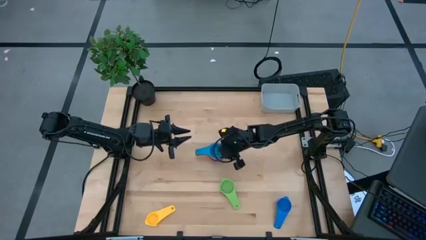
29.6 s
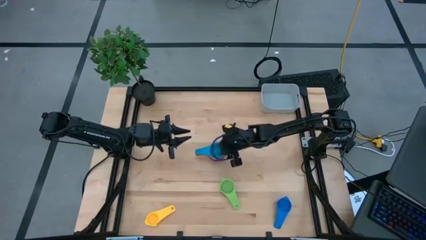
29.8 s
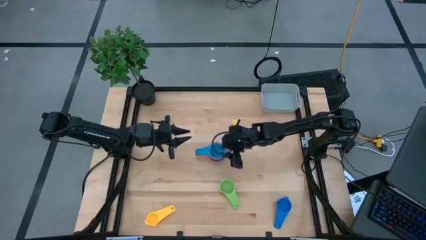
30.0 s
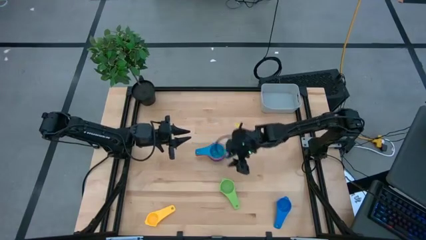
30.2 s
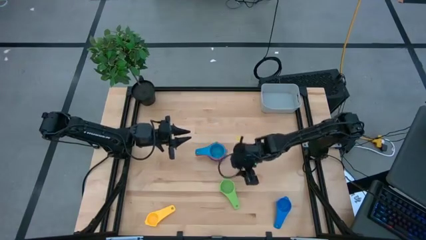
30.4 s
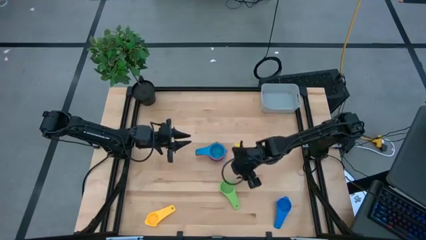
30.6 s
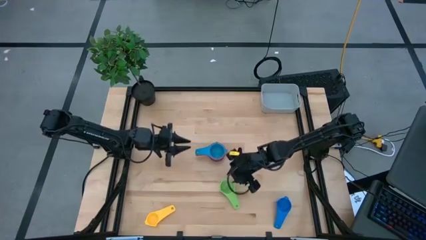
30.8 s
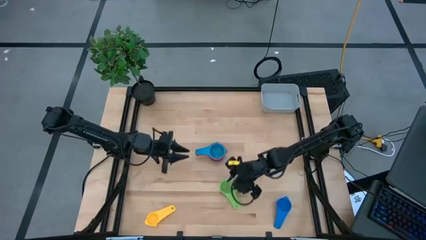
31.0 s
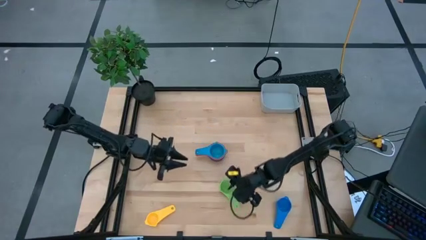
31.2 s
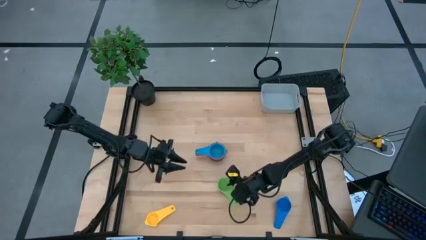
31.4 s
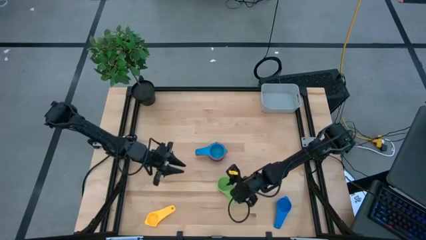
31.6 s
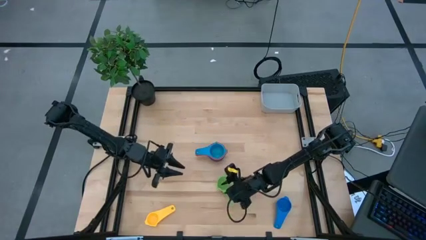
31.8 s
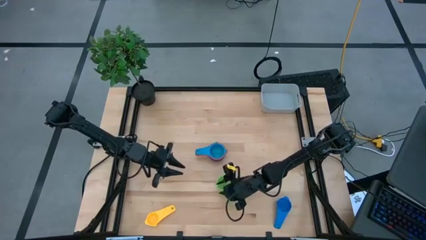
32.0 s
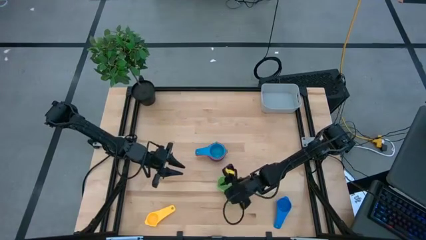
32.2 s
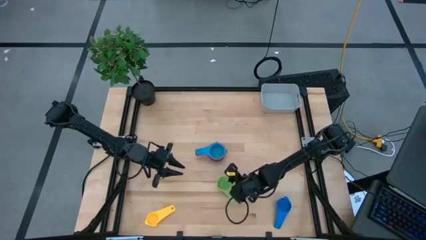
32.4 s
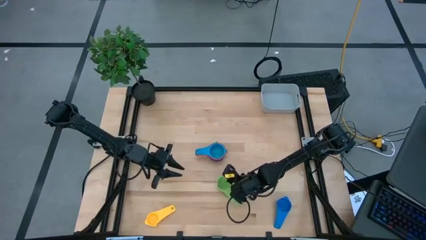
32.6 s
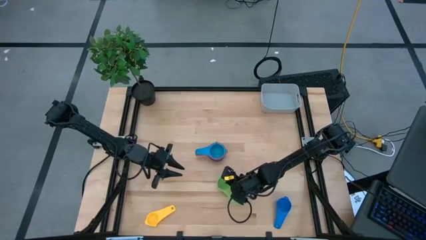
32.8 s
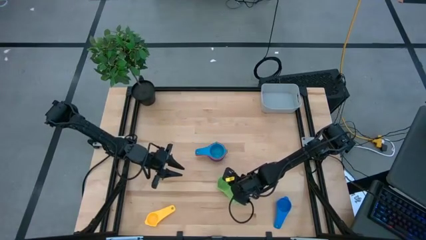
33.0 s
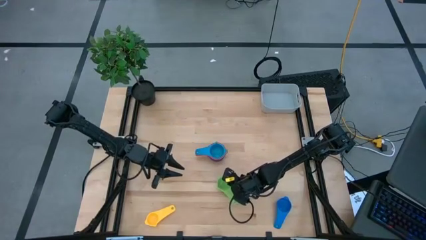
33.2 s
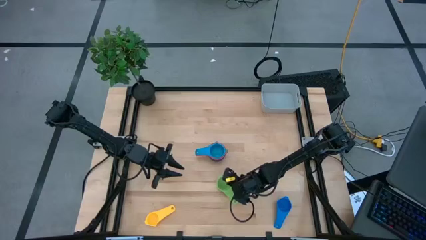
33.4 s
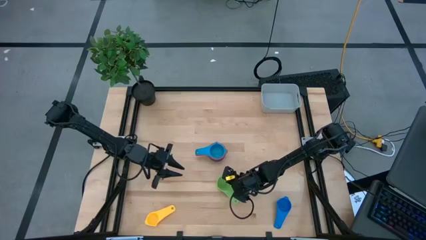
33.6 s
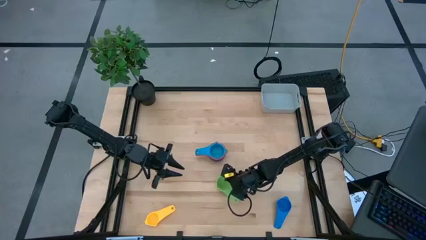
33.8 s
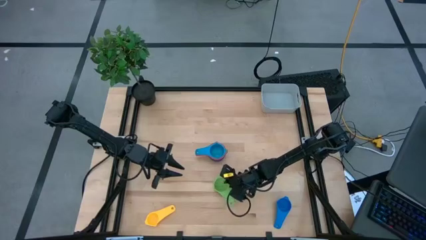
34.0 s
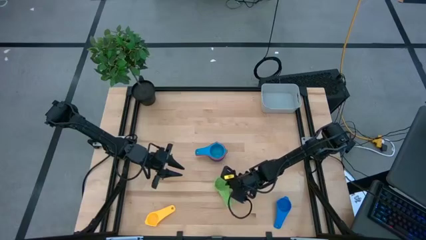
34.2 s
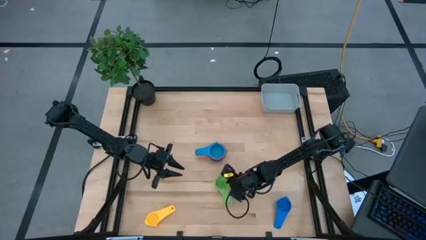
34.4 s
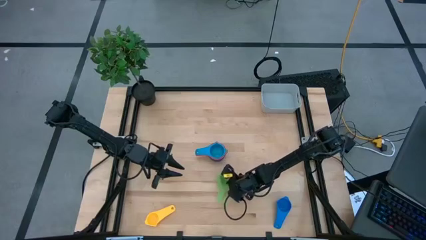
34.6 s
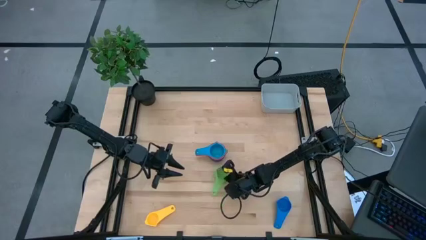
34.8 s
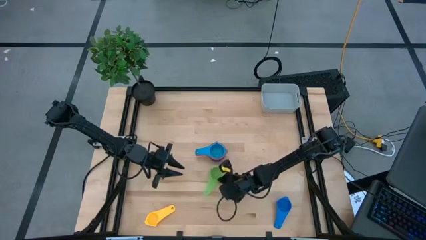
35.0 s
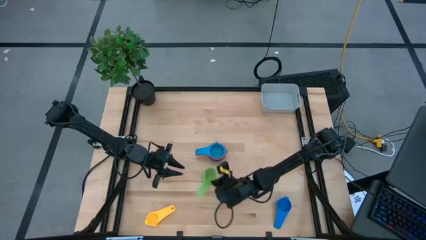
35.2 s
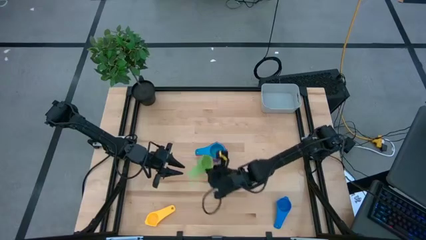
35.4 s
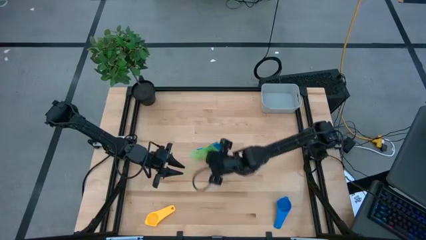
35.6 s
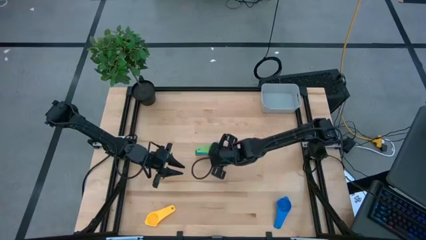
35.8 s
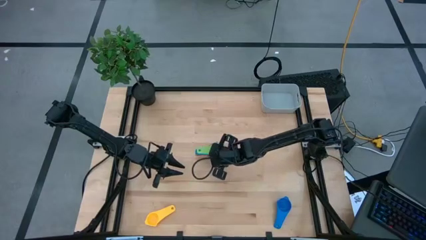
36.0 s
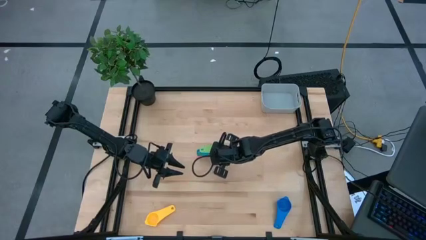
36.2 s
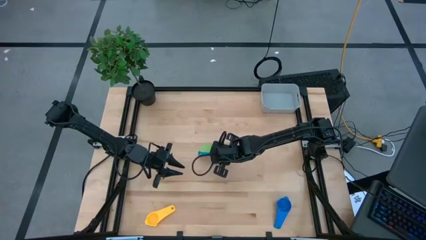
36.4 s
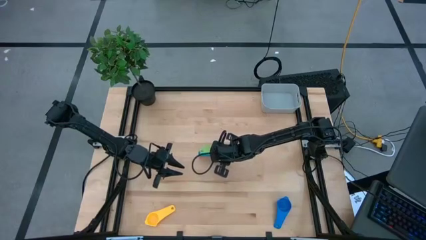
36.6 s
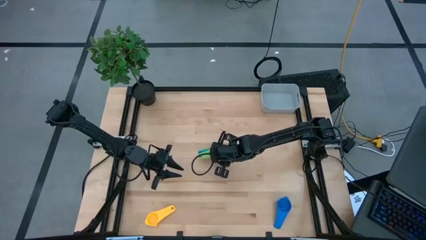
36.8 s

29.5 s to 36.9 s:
Task: Nest measuring cups in basket
Stack the green measuring cup on top of the light blue measuring cup

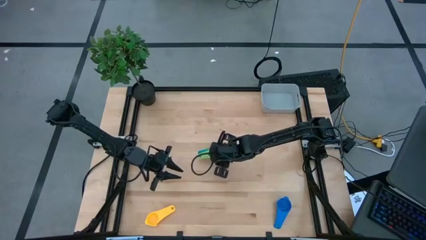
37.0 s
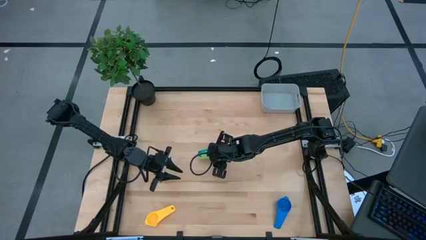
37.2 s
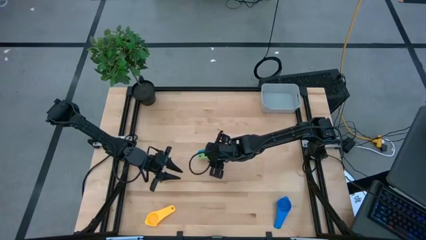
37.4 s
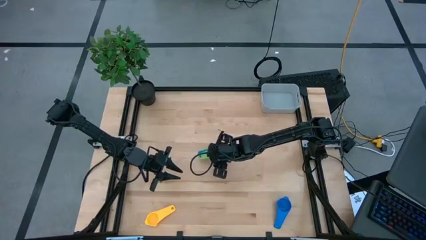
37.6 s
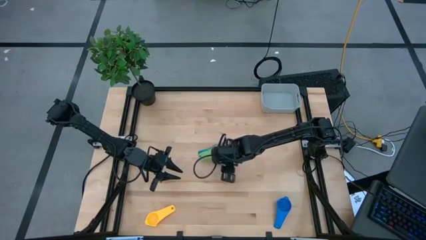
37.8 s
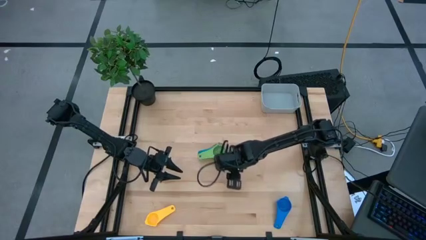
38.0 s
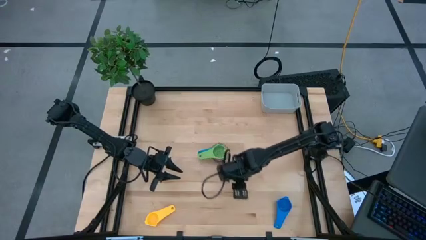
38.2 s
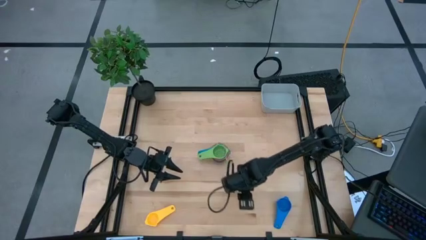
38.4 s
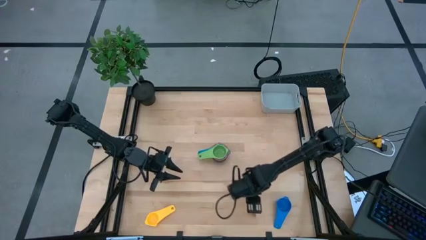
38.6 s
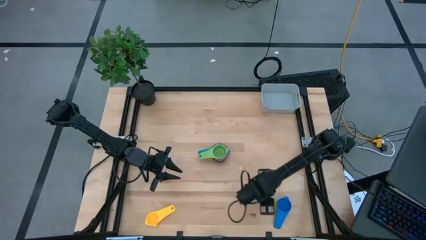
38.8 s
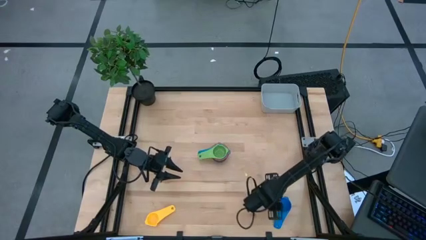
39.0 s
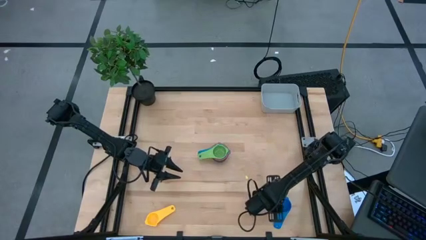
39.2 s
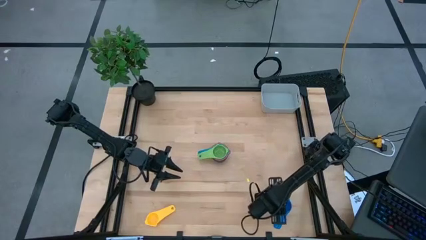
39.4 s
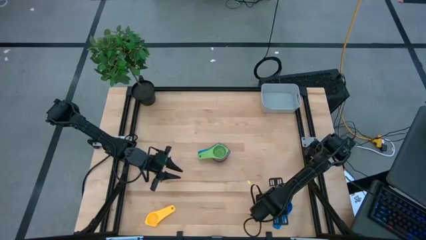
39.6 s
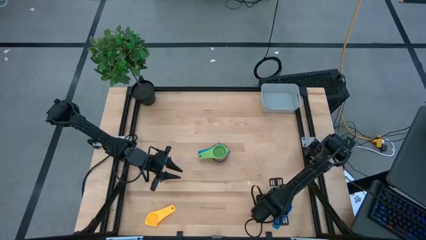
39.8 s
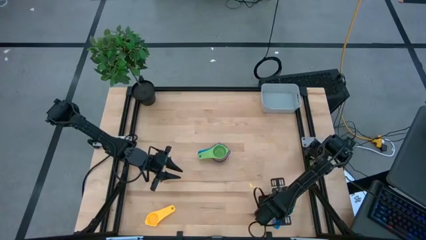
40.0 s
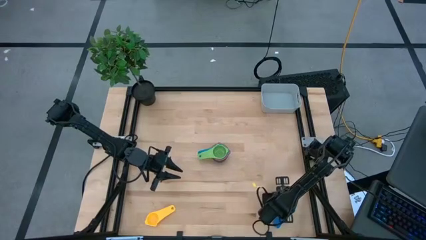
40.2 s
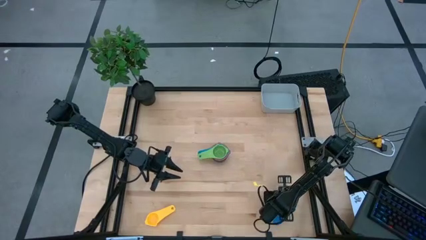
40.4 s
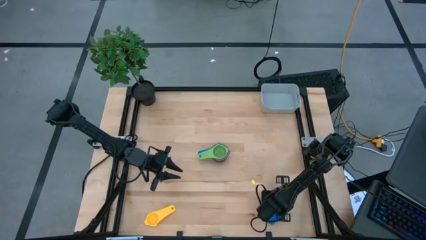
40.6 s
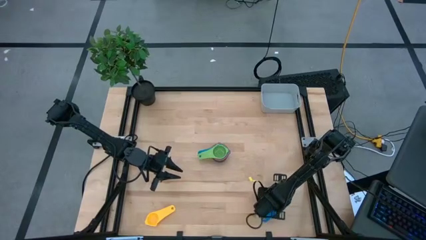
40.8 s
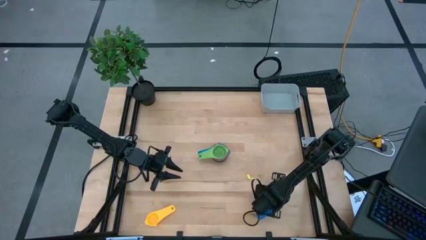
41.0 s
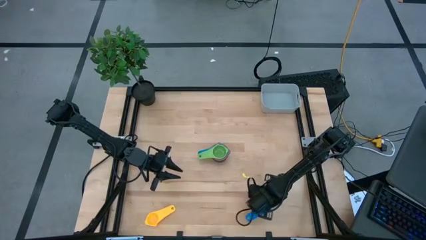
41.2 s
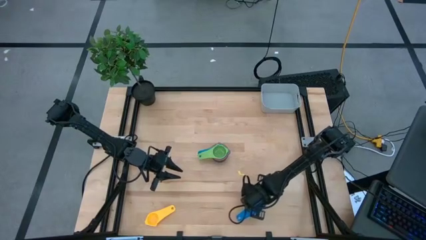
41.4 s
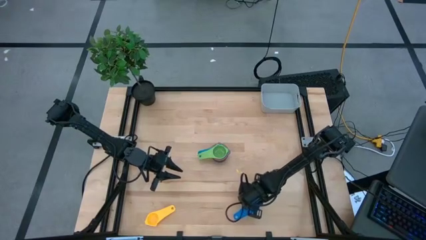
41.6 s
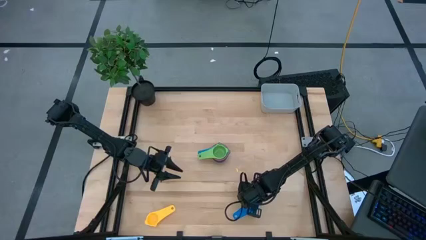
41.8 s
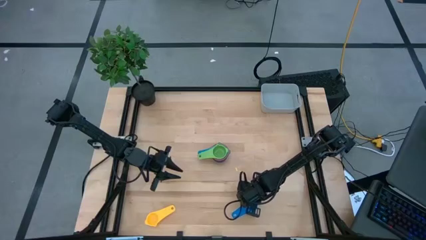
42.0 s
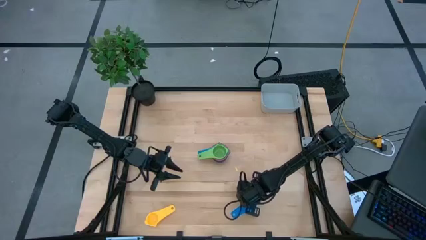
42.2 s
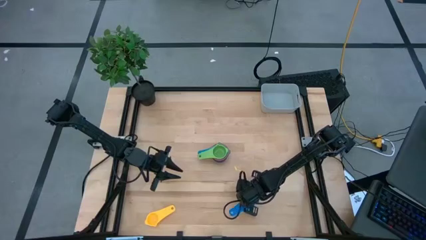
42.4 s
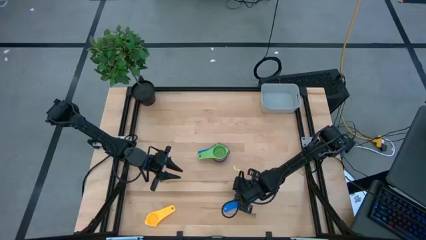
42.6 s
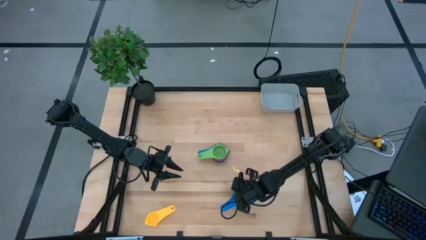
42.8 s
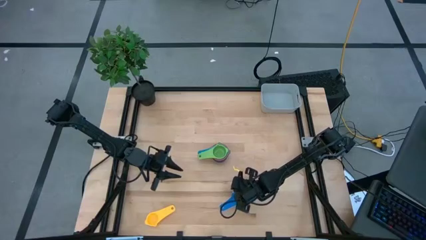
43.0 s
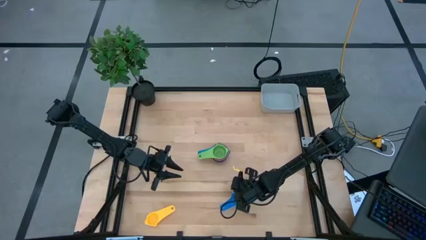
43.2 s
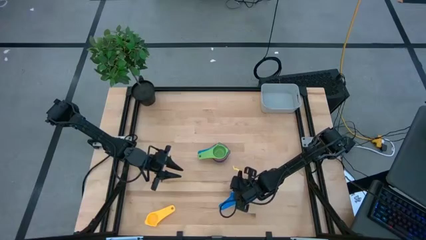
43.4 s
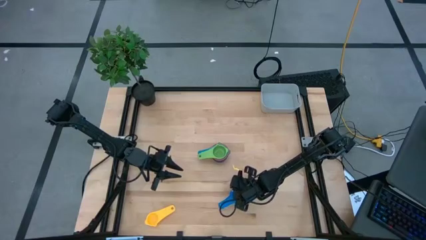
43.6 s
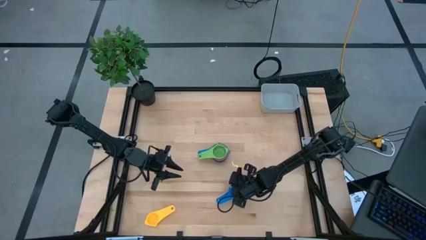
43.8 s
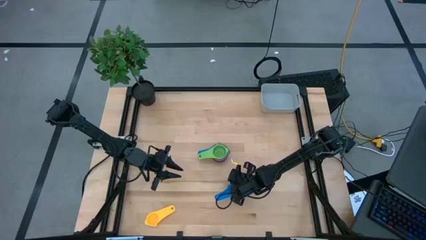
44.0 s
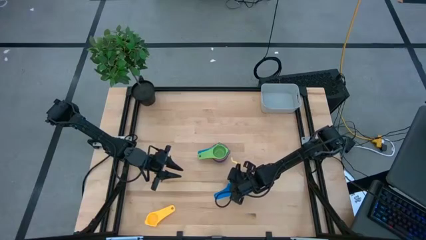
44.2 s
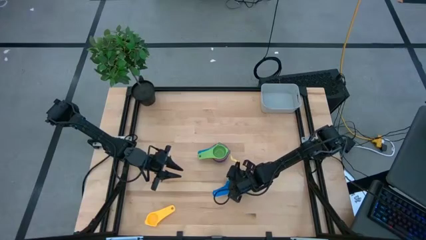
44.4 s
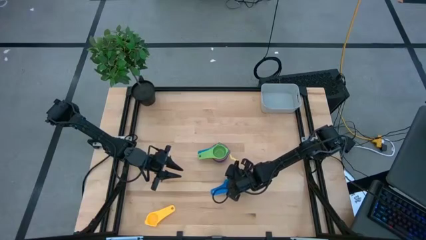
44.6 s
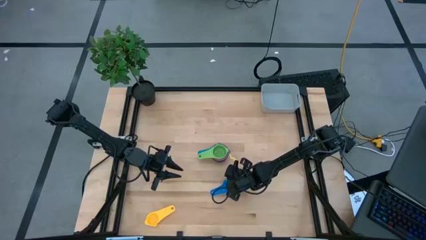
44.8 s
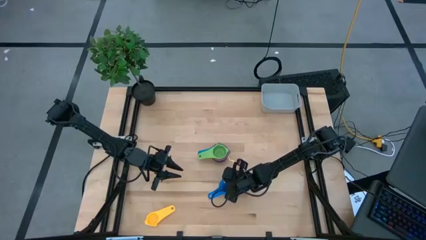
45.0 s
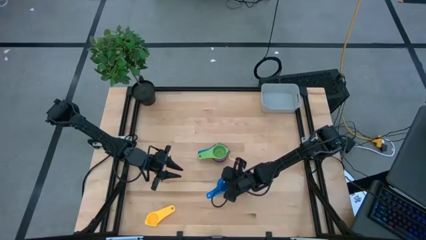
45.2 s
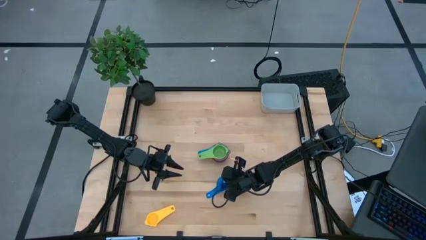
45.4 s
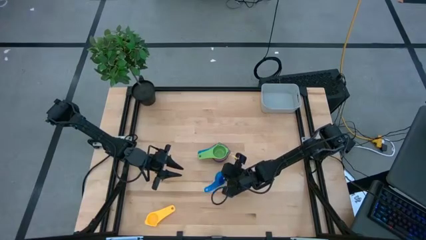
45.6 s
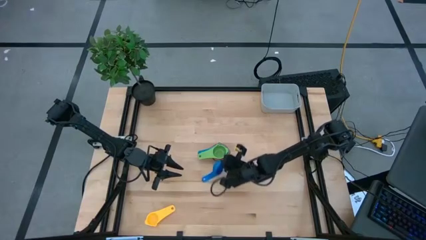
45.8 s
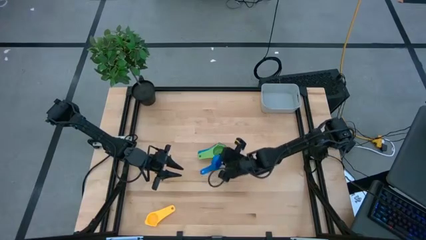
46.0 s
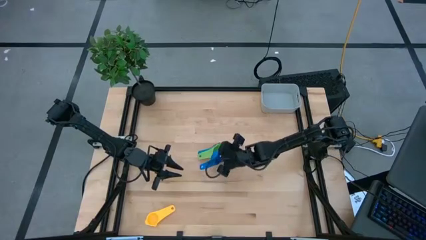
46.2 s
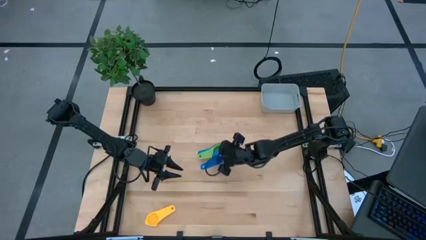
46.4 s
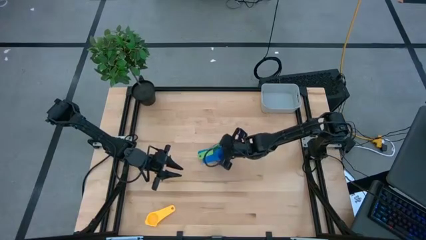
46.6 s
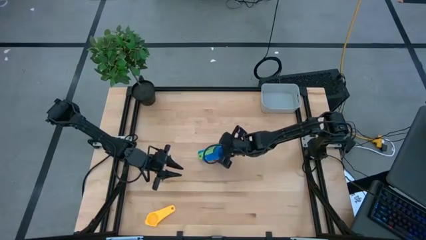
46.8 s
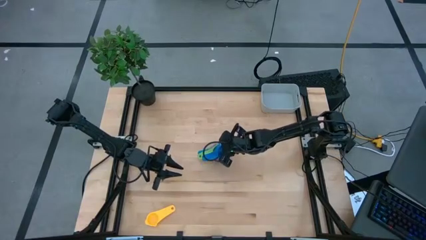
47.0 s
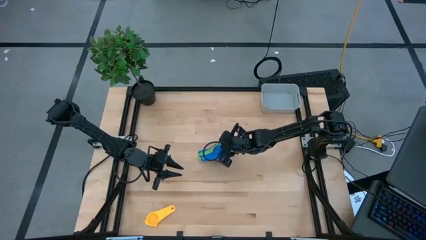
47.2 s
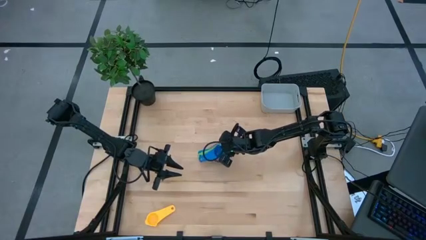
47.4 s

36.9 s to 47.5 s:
Stack the blue measuring cup on top of the green measuring cup
